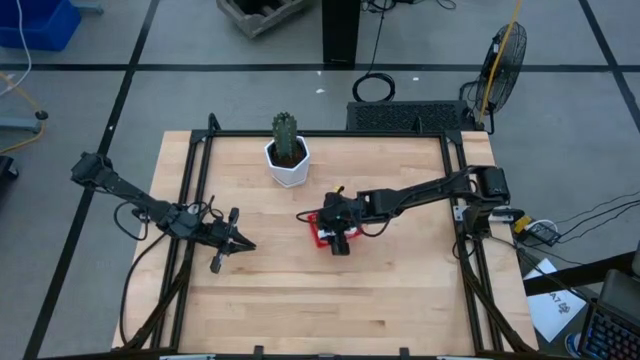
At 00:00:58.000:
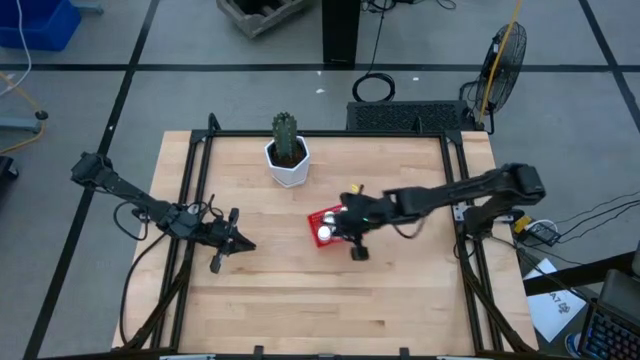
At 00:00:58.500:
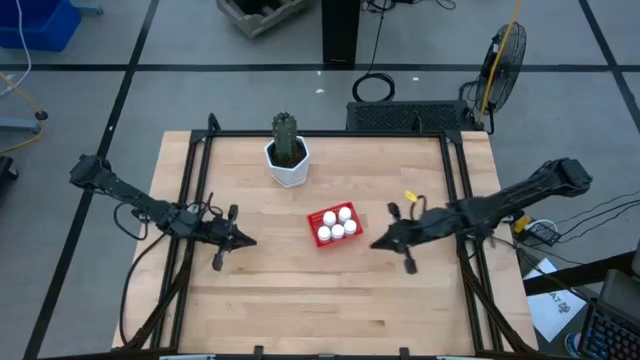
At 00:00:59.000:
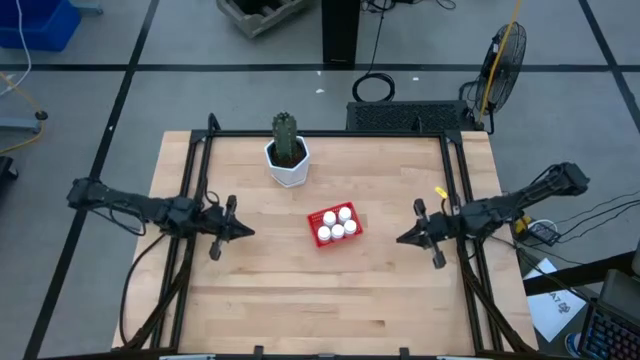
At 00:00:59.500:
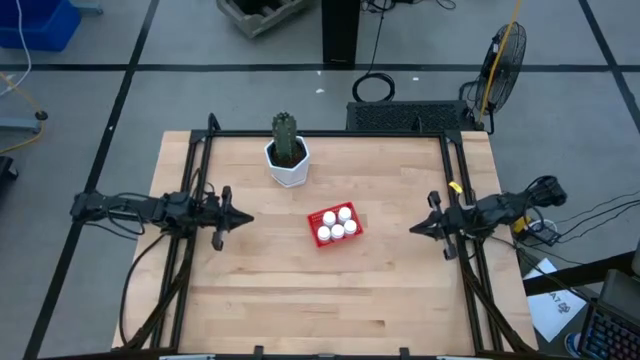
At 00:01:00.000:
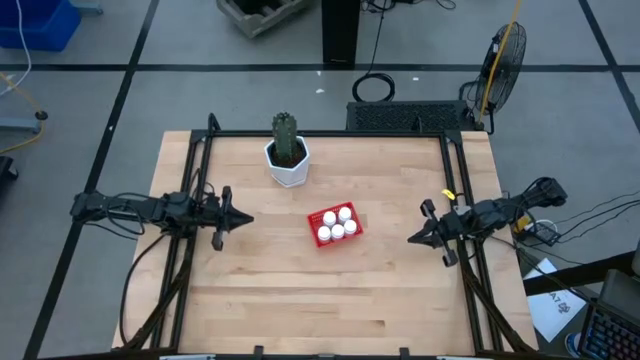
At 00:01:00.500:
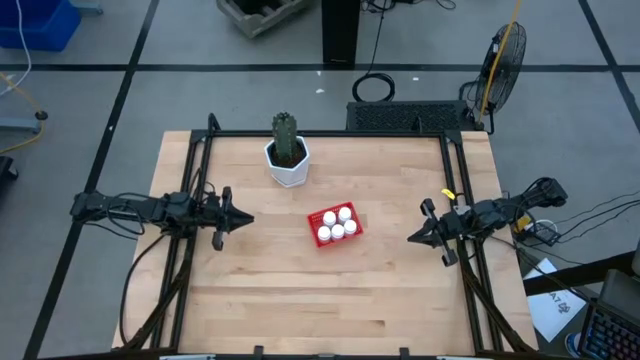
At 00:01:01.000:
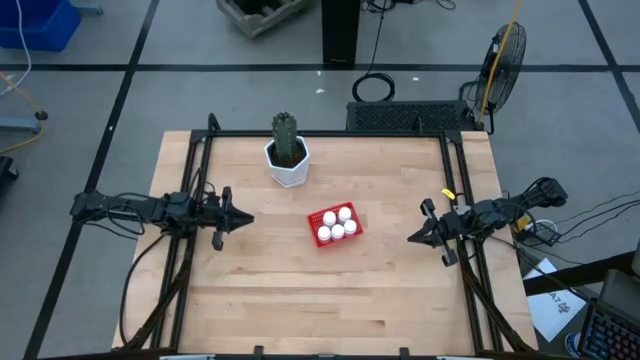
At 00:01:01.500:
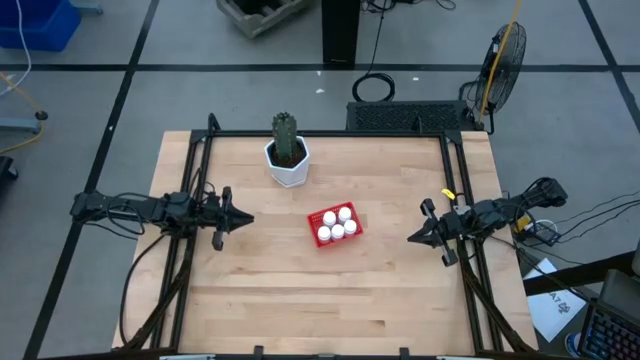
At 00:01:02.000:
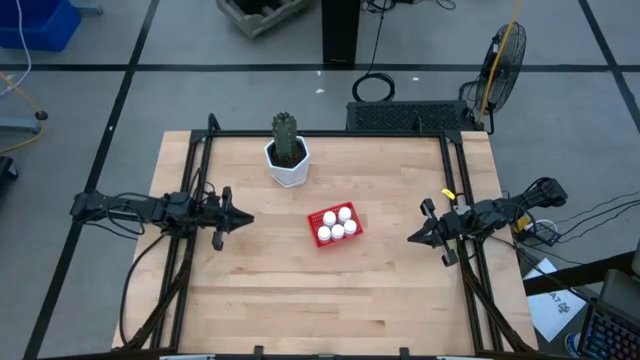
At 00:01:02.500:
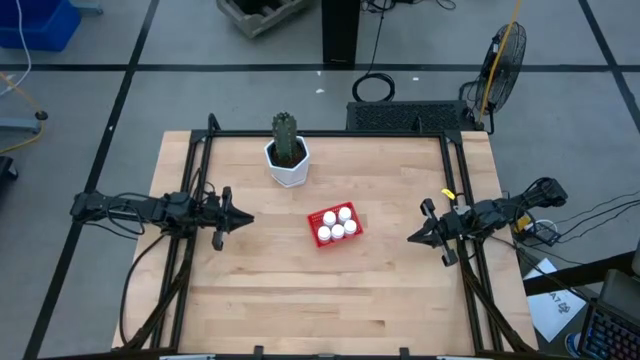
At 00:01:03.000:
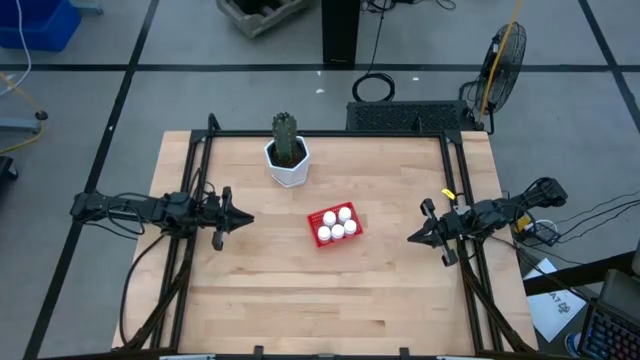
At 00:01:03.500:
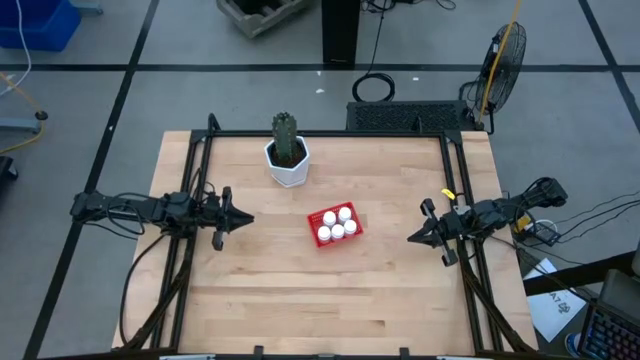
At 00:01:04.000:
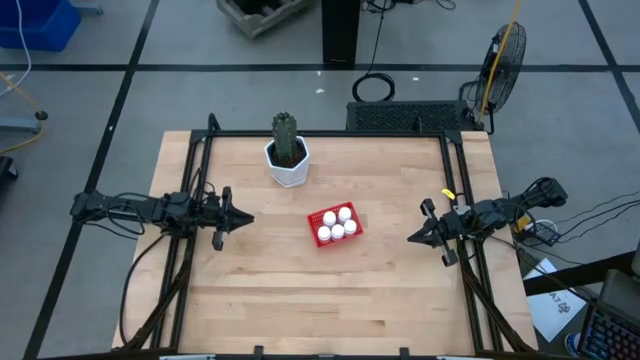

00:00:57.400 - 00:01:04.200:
Task: Pick and place pill bottles into a basket
Return to Home Position

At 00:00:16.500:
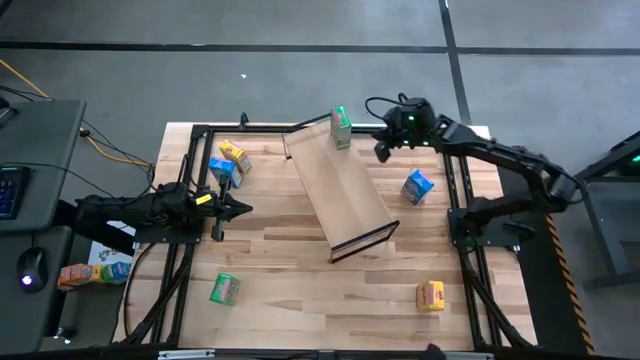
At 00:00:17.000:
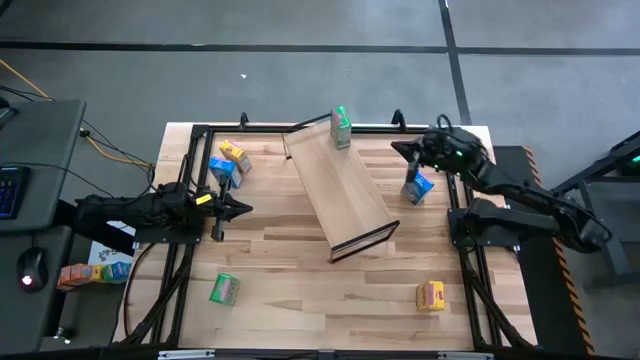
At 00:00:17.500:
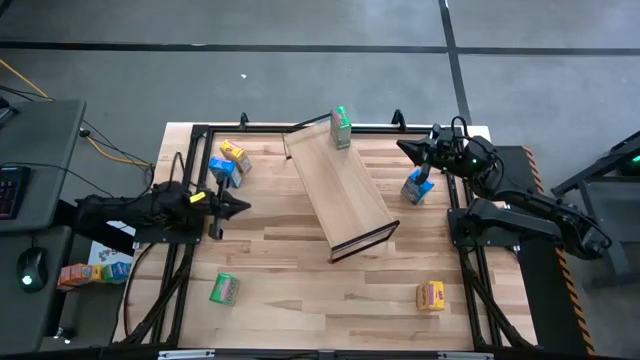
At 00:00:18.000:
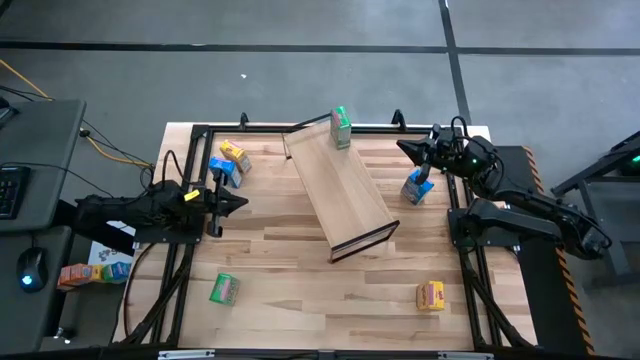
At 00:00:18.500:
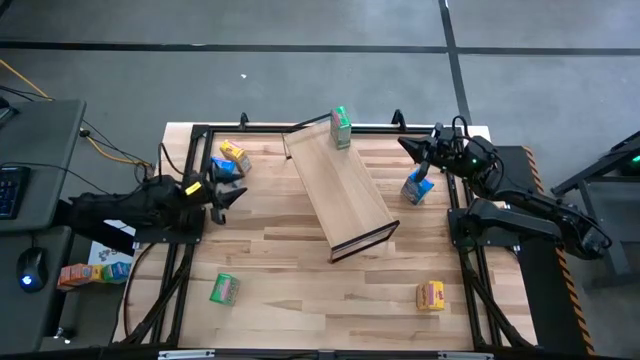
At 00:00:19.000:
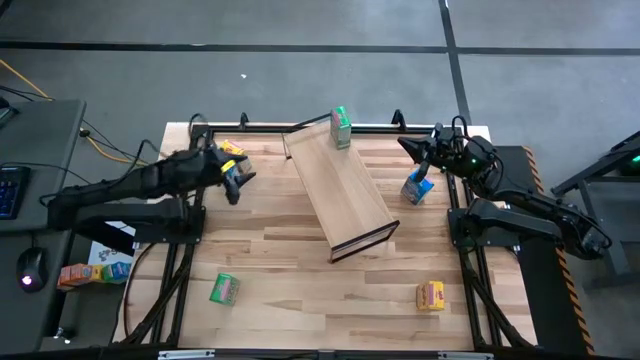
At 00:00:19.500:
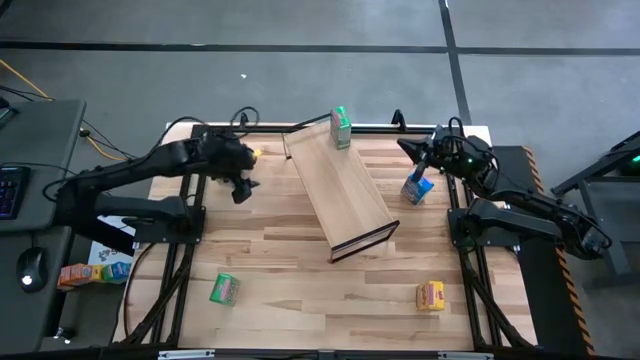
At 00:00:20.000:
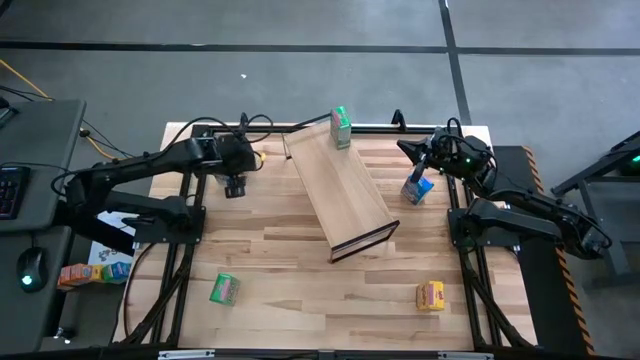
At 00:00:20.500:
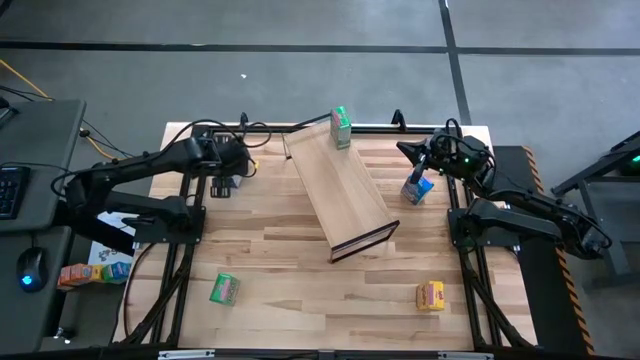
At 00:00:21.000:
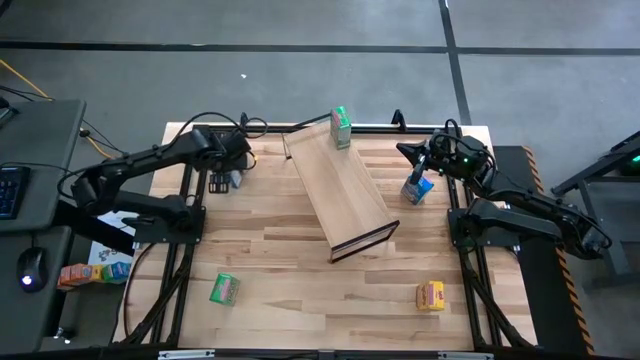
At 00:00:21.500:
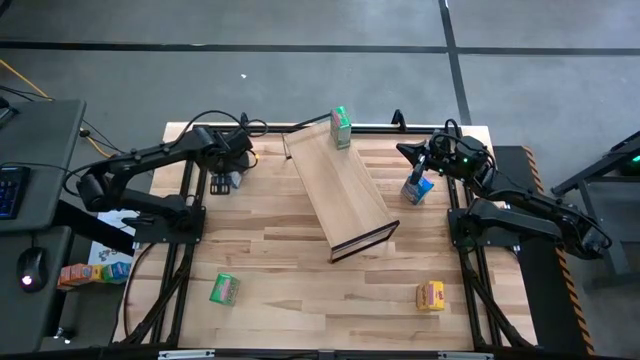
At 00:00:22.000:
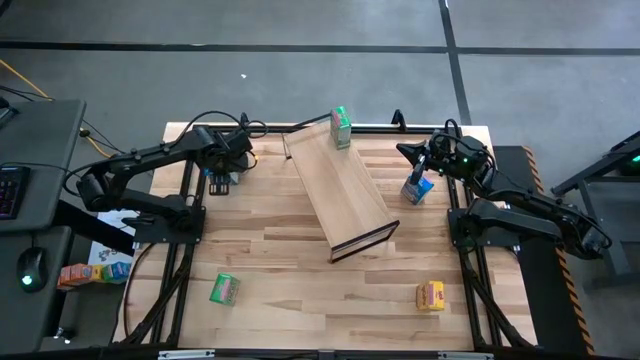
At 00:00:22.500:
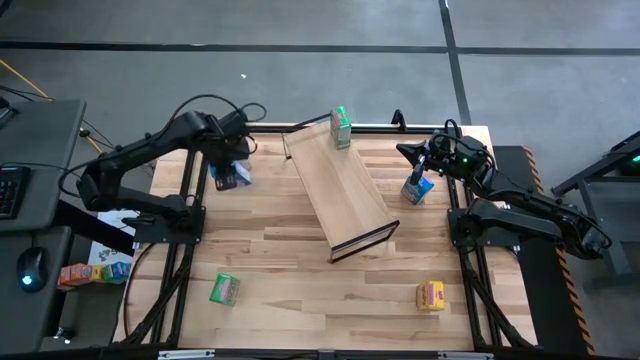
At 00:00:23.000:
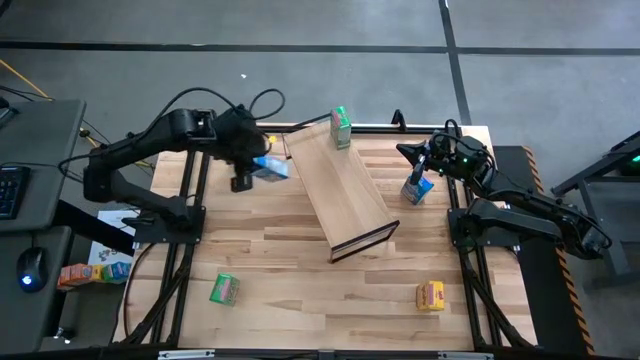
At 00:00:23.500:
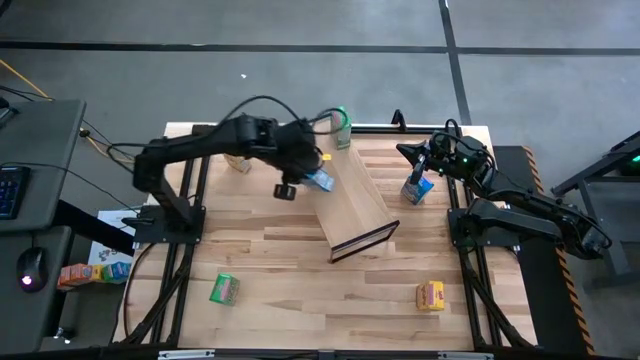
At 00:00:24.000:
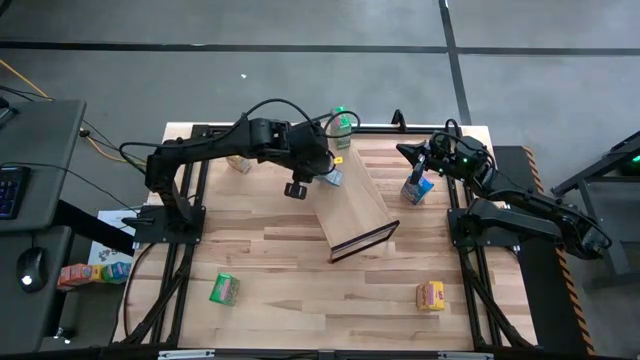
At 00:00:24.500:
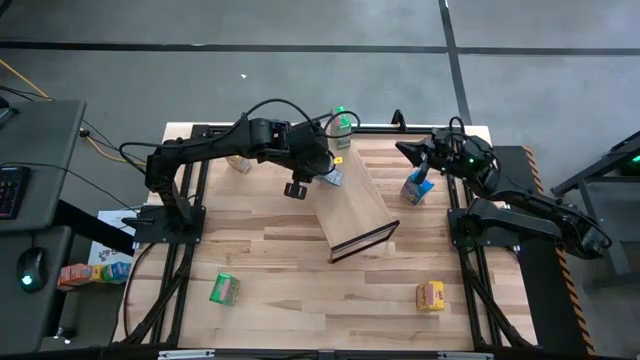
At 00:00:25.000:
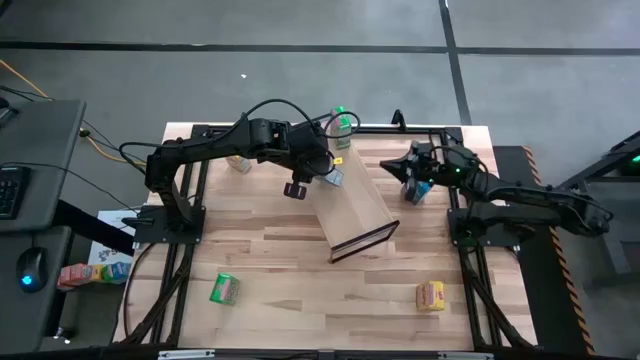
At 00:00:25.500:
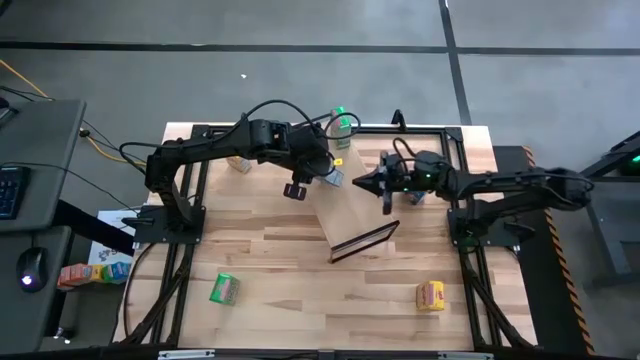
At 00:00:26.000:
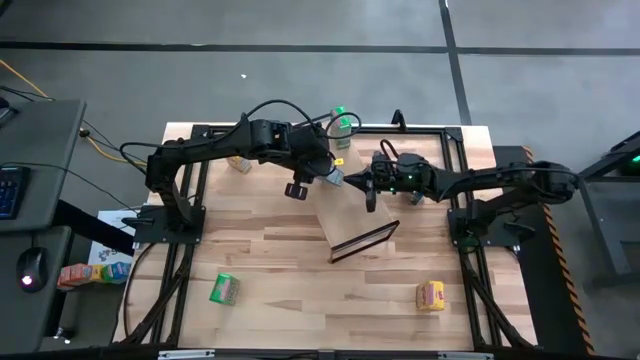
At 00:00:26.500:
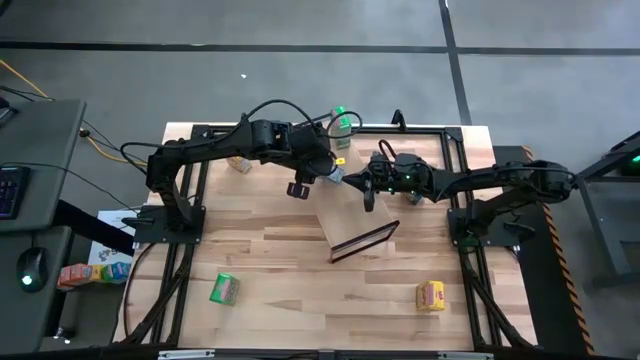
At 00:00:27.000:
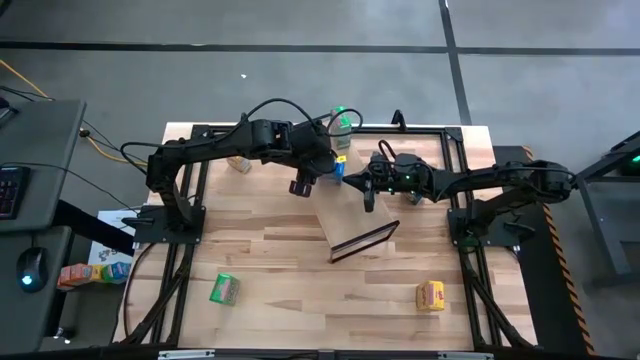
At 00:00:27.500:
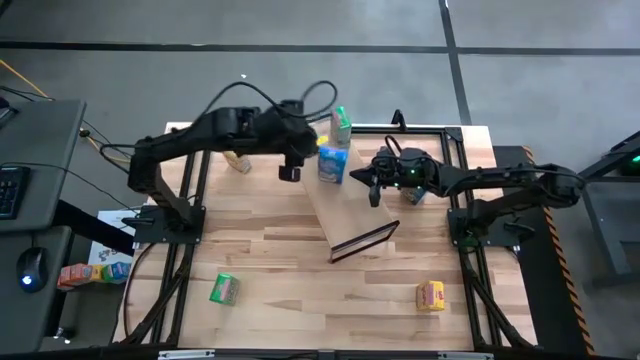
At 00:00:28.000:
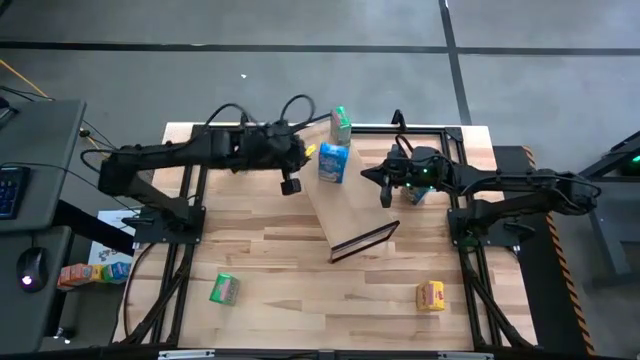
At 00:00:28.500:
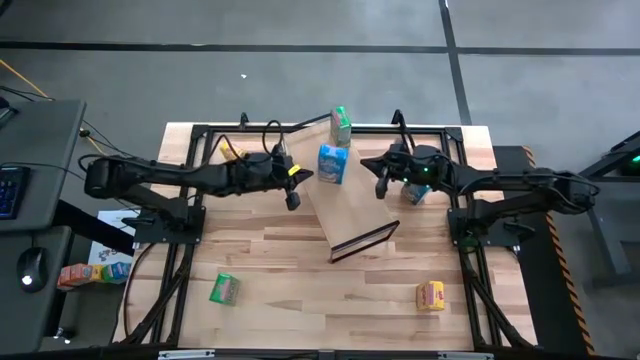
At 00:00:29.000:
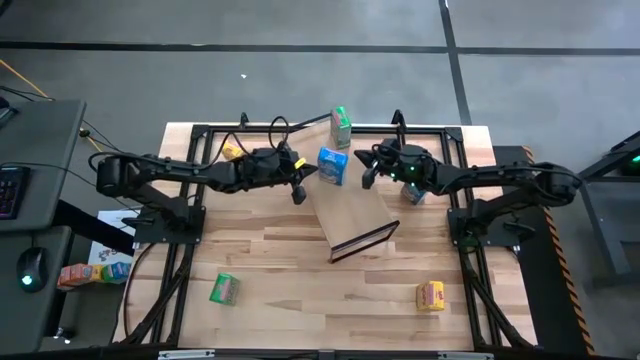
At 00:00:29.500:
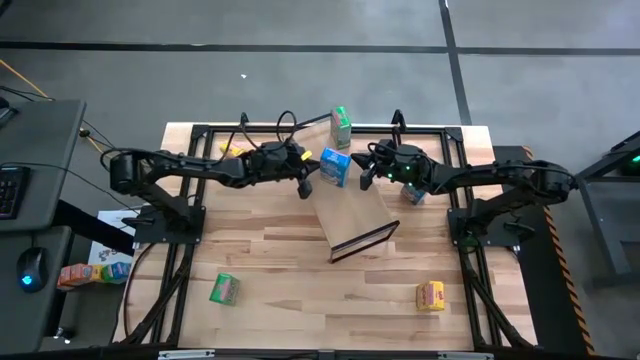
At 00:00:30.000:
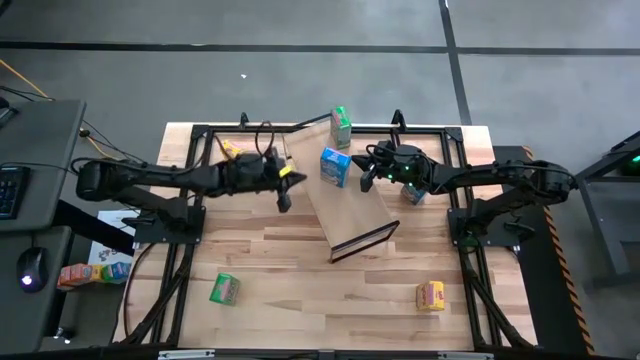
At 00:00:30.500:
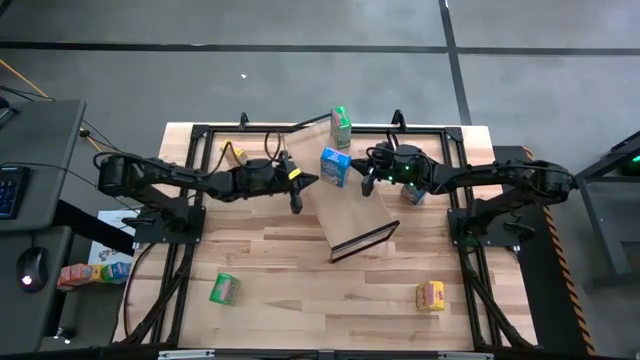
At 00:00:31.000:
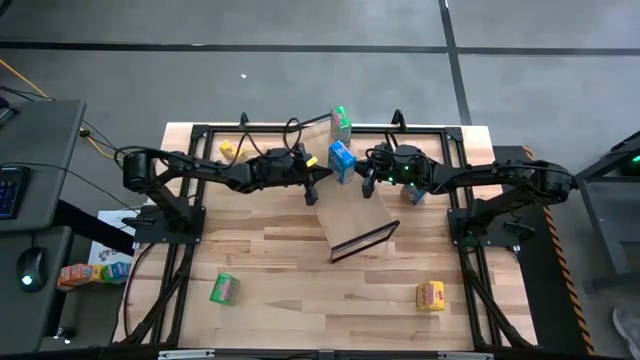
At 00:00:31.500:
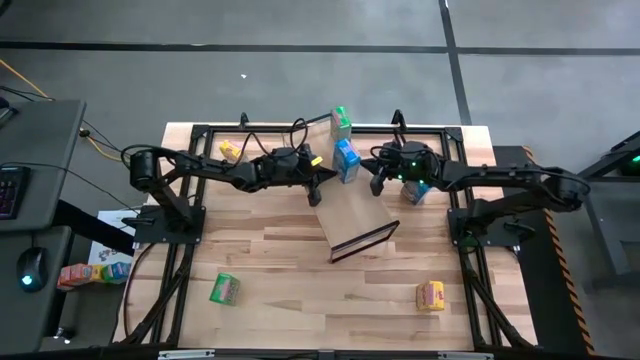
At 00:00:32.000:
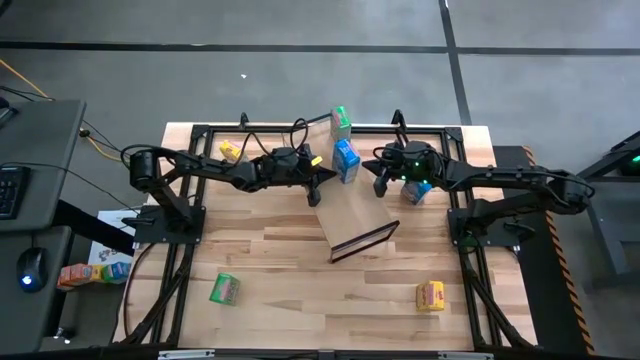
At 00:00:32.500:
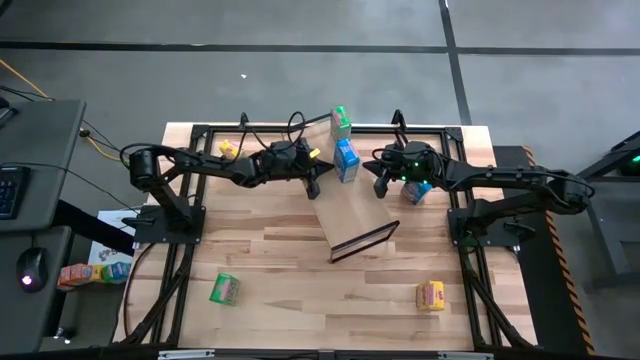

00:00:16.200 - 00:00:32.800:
Task: Stack cereal on shelf
Put the left blue cereal box on the shelf
